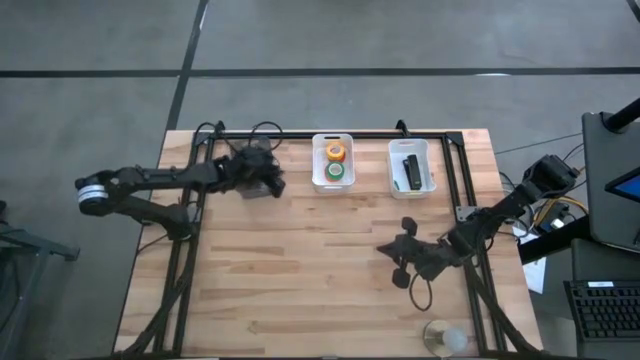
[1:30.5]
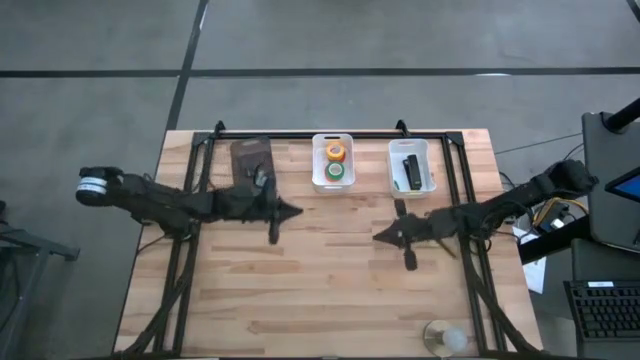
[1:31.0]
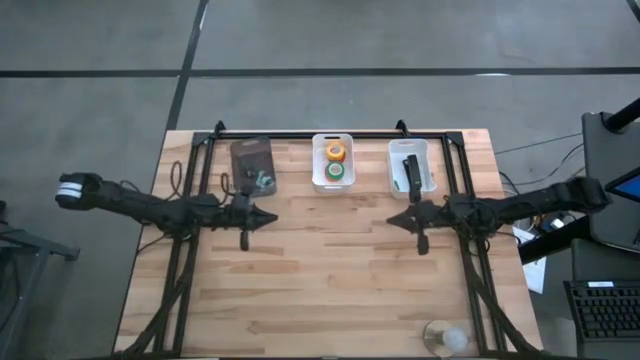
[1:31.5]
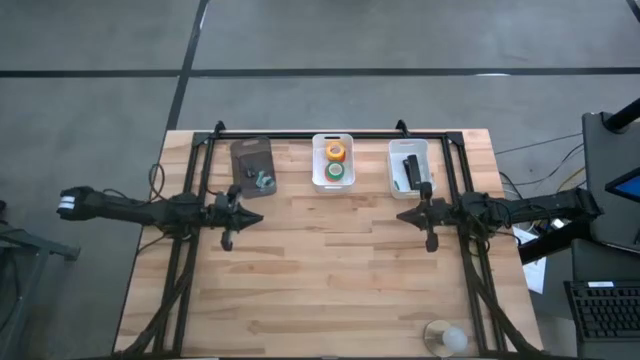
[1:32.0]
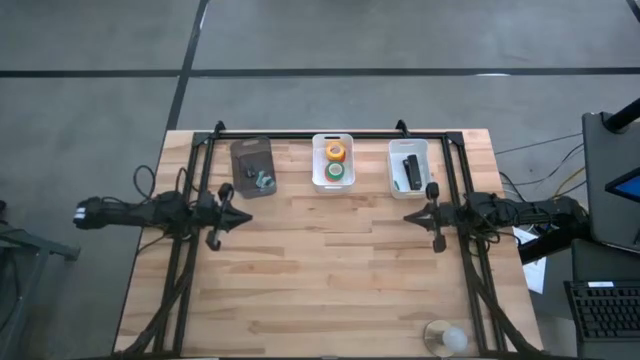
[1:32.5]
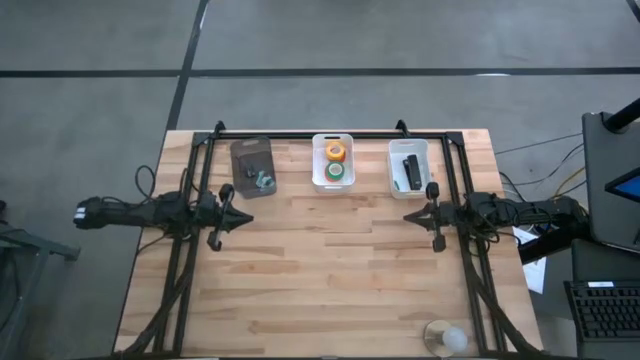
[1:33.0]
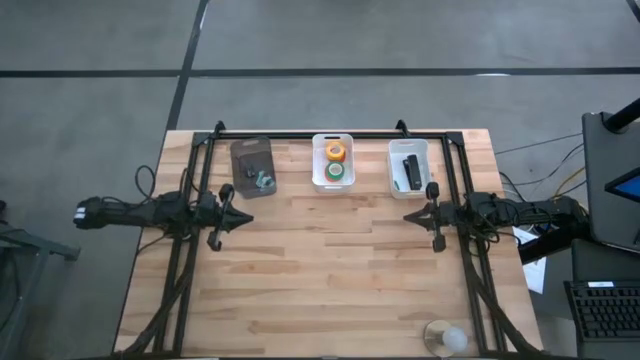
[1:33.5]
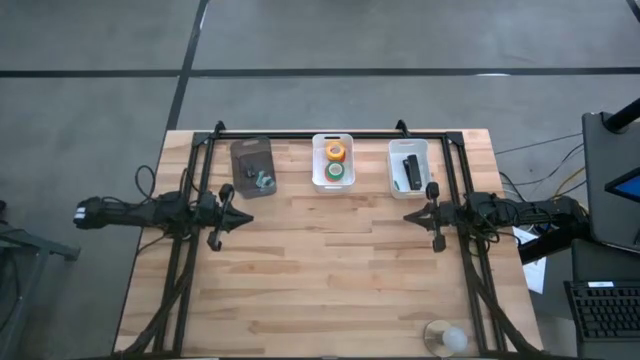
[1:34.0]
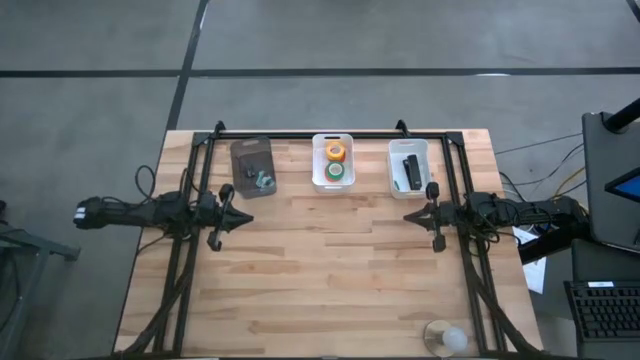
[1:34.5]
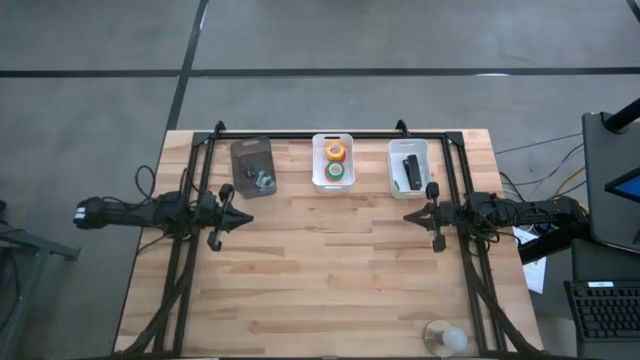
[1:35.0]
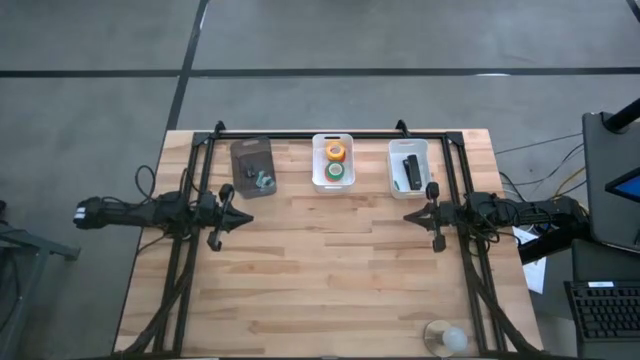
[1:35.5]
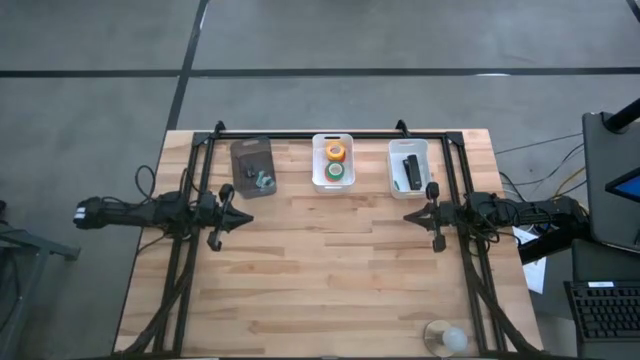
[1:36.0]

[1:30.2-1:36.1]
Task: Pick and place Stapler, Stapler remover, tape
Return to Home Position

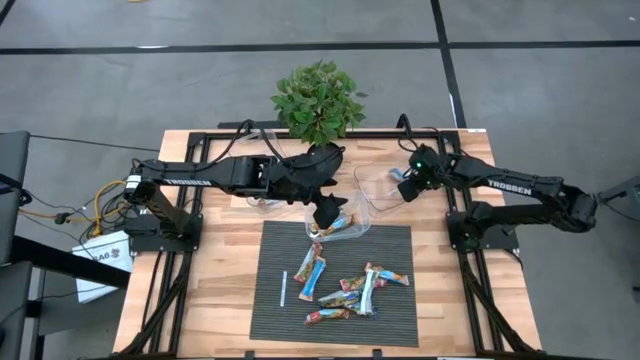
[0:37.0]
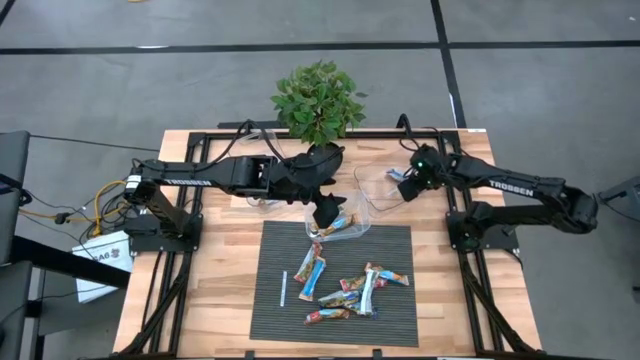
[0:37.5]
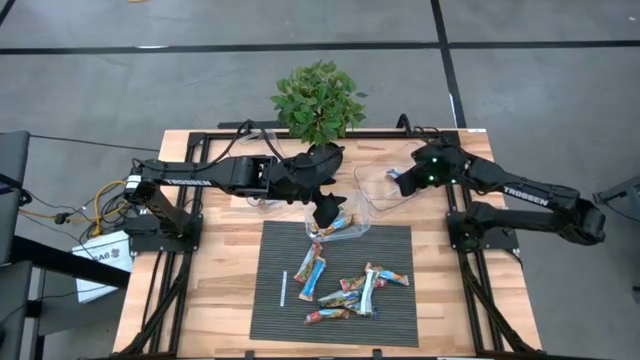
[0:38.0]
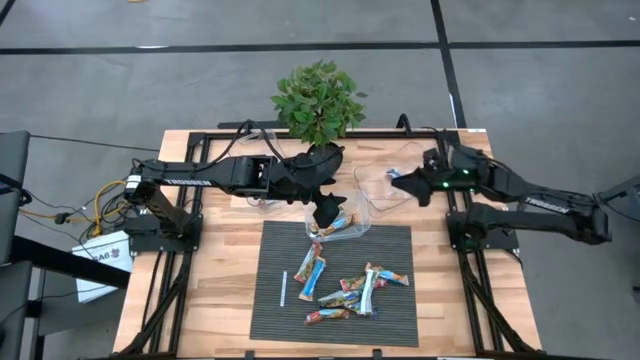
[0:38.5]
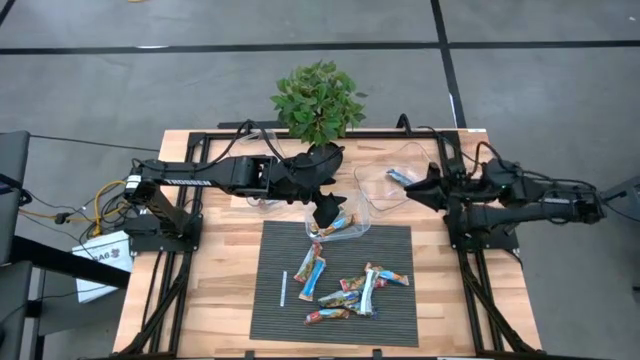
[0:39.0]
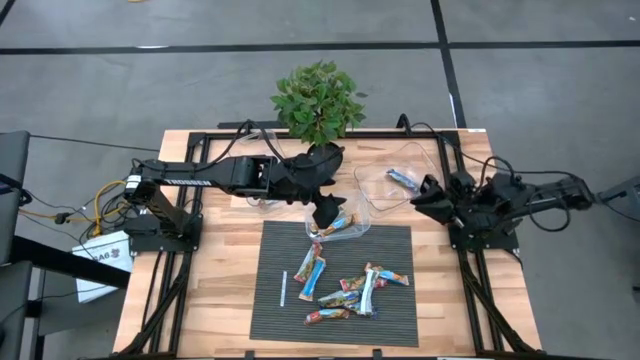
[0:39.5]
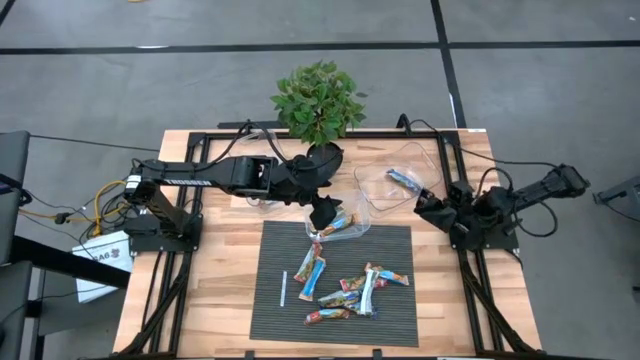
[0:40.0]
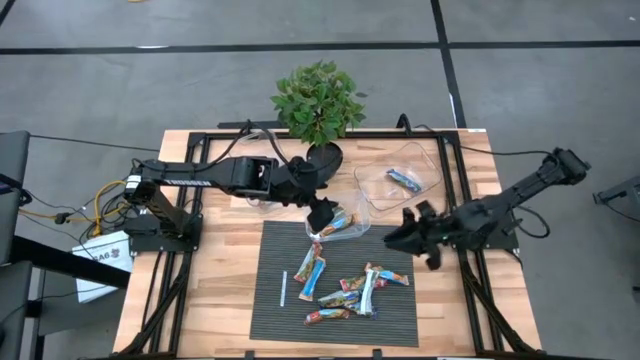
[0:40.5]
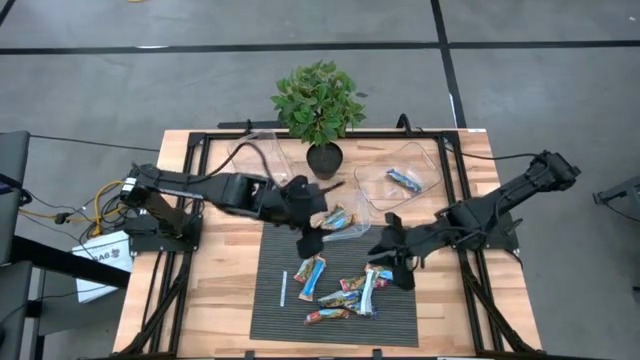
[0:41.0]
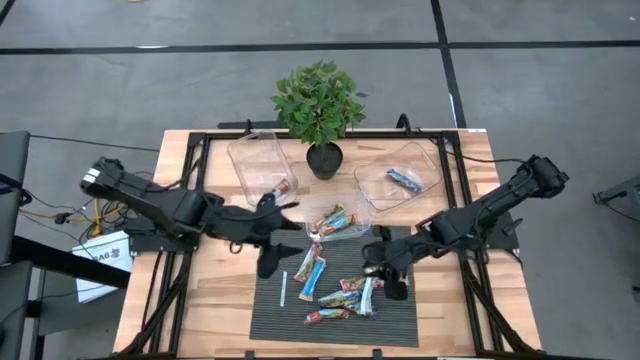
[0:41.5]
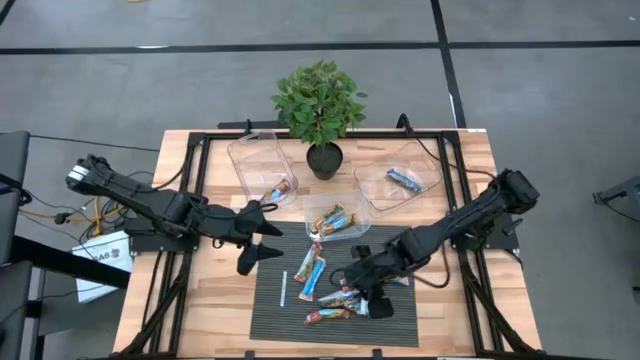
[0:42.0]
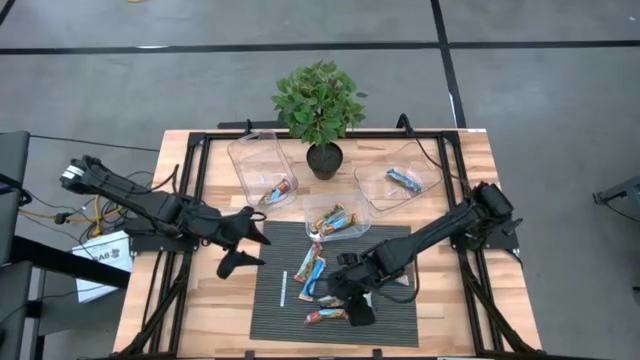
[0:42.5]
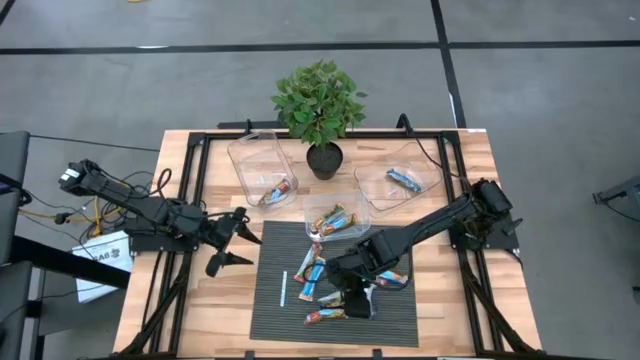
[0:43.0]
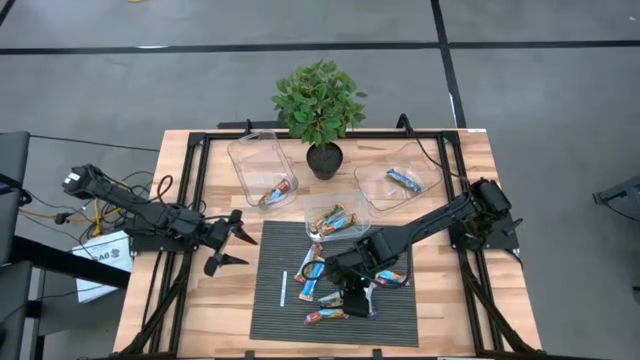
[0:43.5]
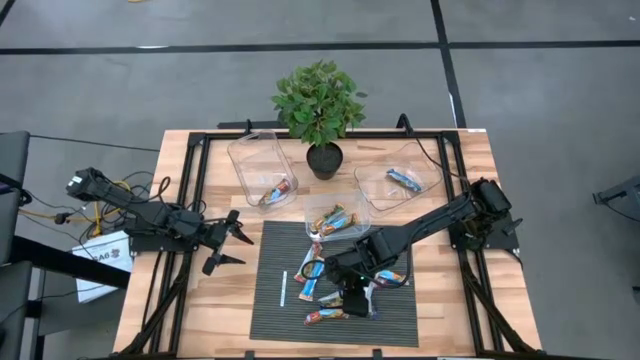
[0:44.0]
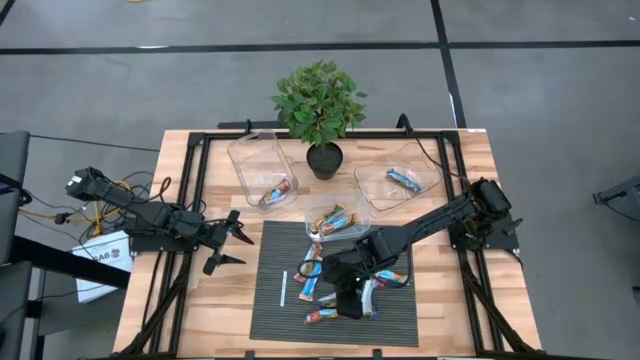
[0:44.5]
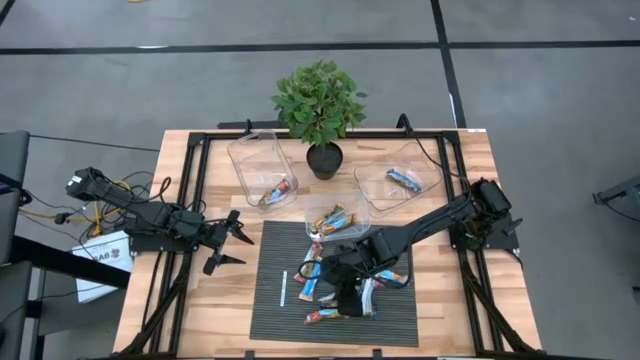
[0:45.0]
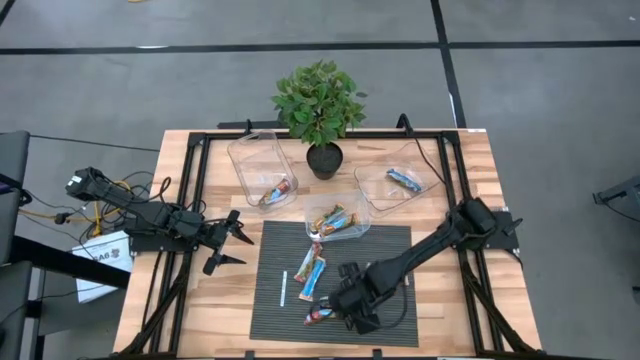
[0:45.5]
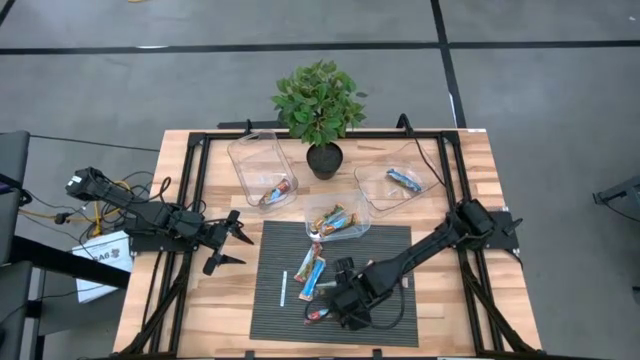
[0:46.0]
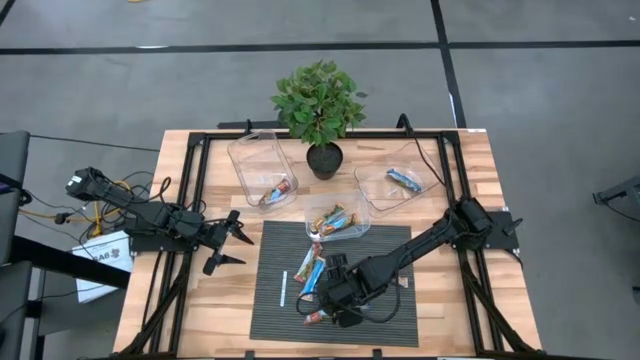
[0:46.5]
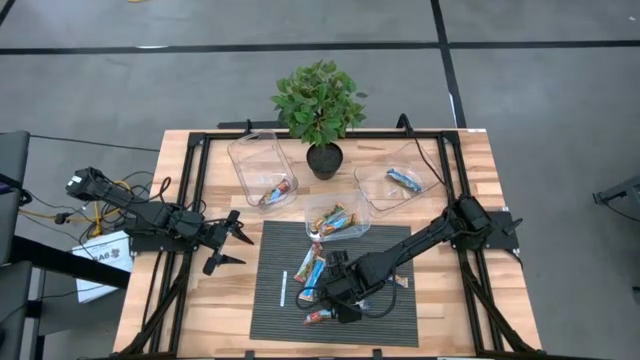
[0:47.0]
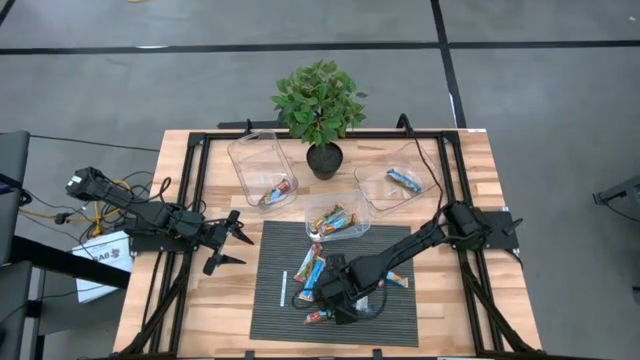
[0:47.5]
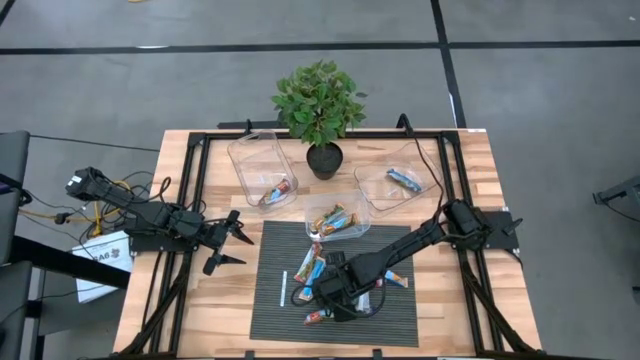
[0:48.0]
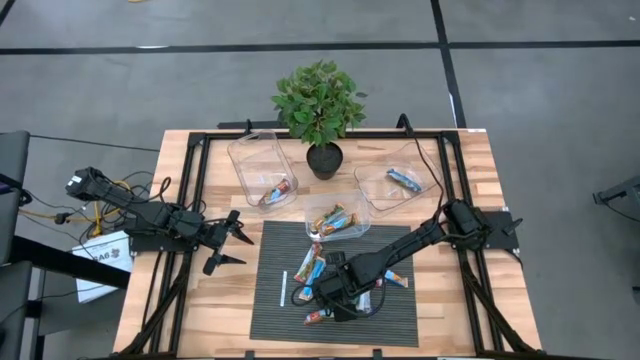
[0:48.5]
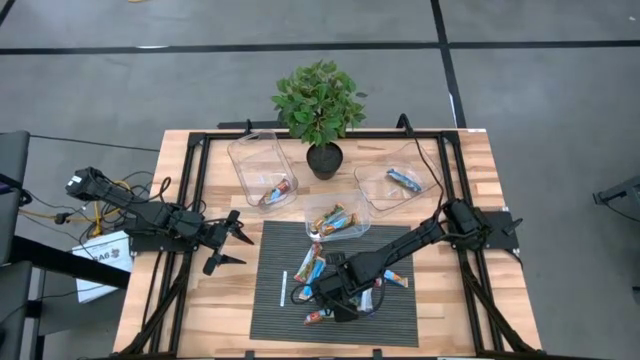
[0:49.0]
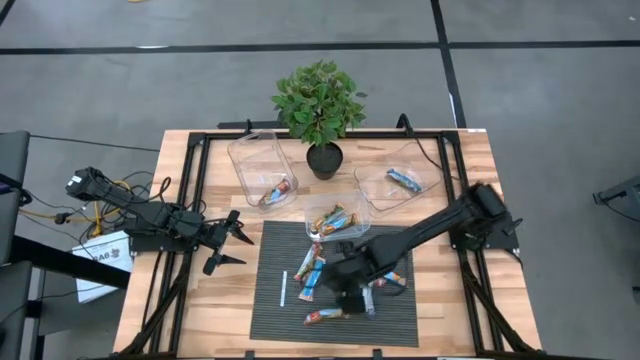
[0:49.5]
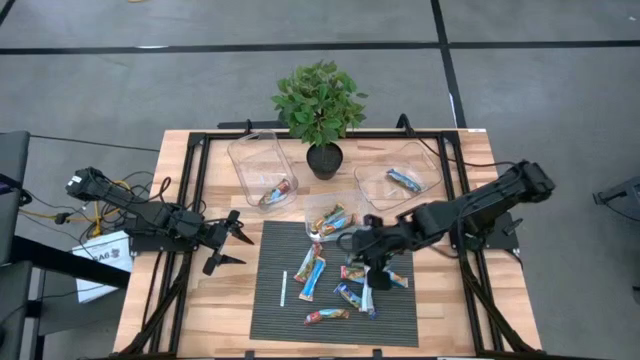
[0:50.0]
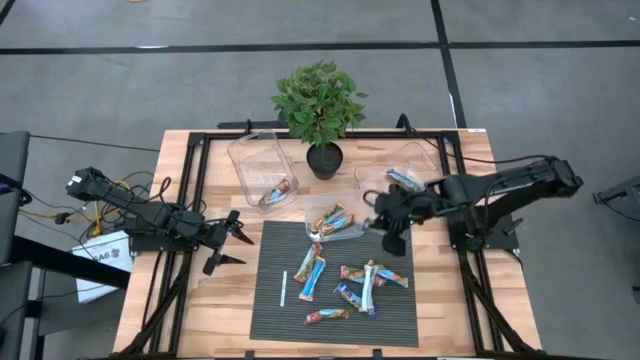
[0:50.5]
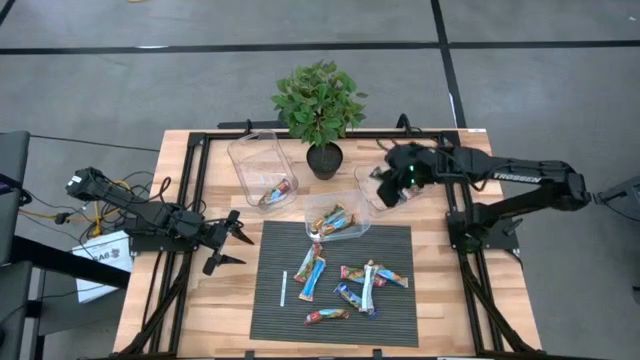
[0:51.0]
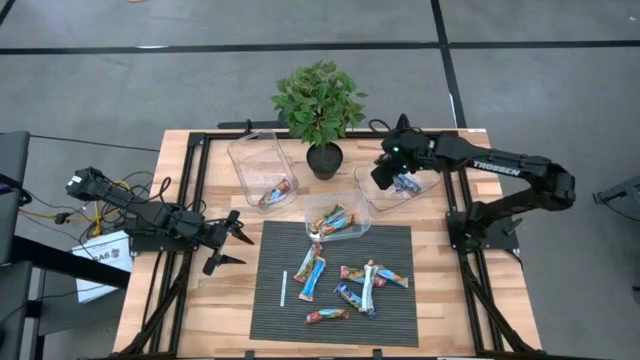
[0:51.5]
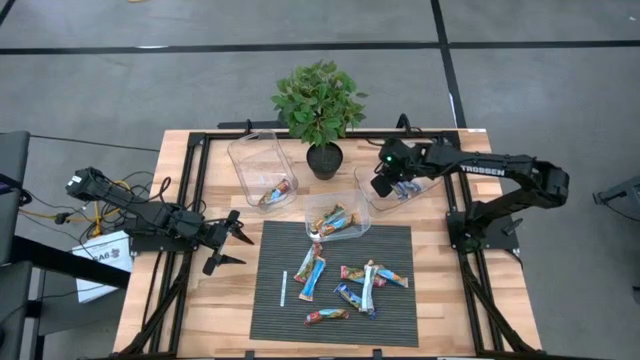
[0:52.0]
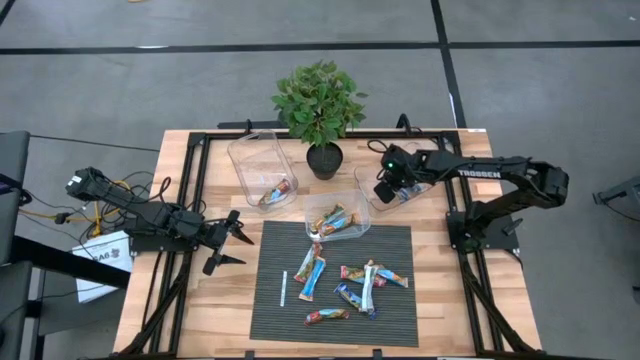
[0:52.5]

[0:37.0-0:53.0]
Task: Pick and place Granola Bars by type
Put the violet granola bar into the right transparent bin
